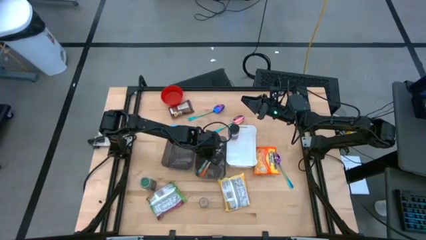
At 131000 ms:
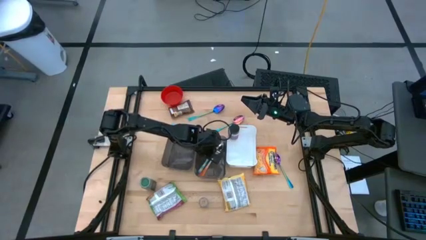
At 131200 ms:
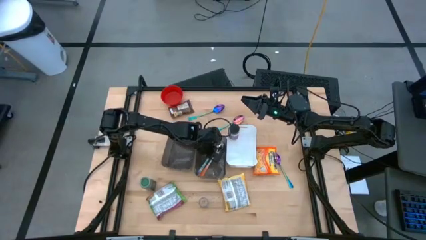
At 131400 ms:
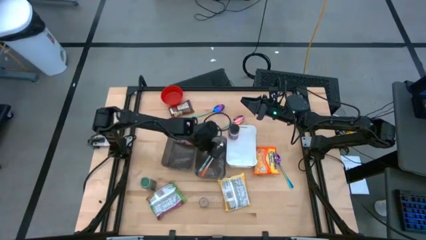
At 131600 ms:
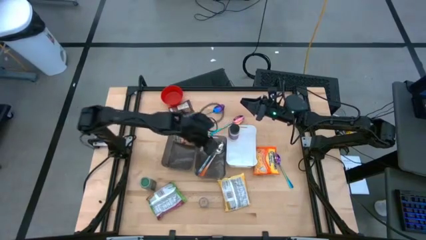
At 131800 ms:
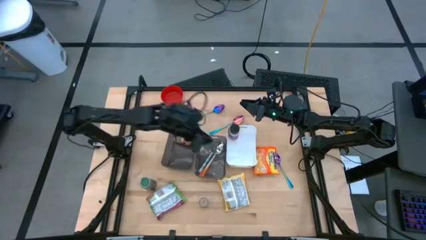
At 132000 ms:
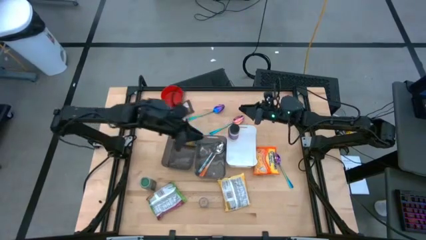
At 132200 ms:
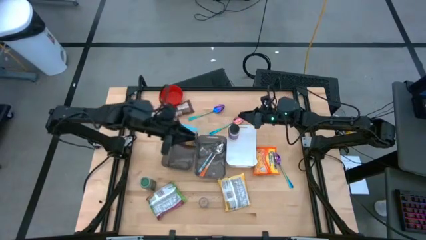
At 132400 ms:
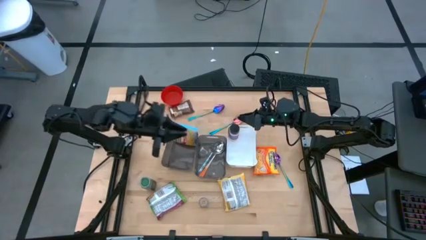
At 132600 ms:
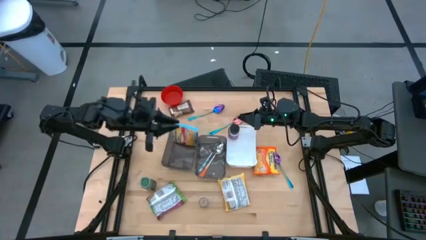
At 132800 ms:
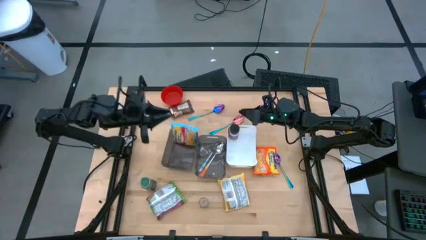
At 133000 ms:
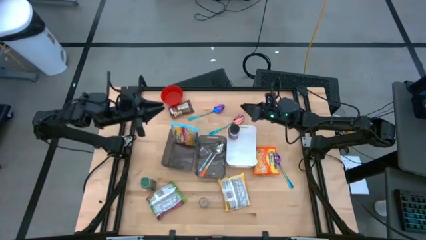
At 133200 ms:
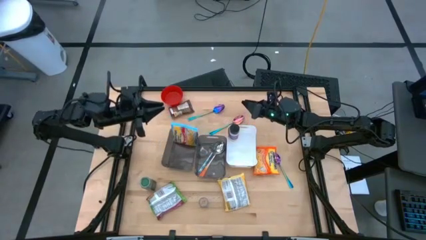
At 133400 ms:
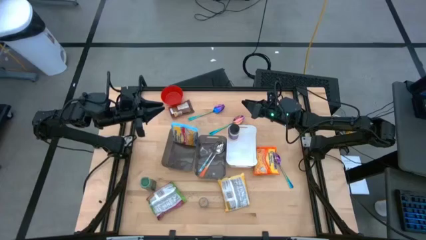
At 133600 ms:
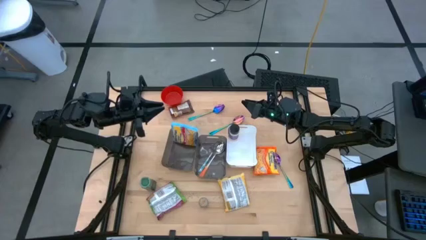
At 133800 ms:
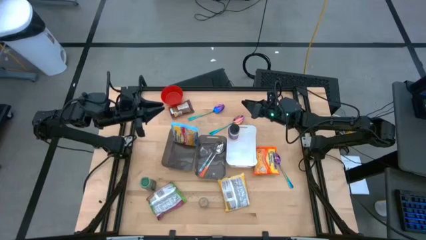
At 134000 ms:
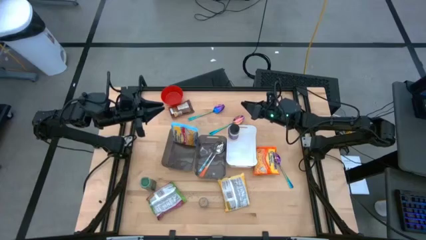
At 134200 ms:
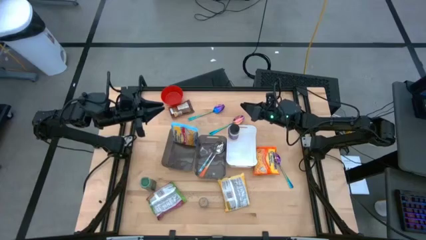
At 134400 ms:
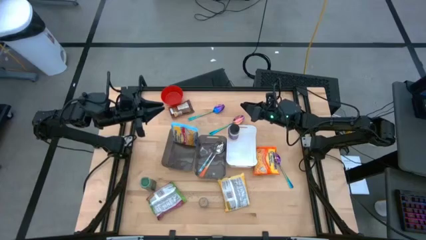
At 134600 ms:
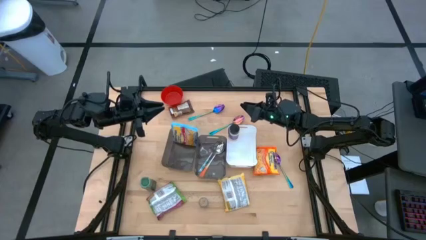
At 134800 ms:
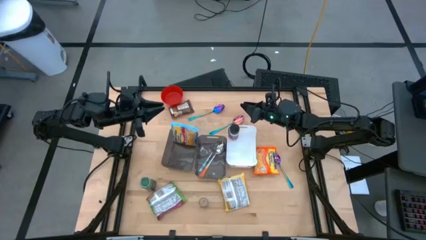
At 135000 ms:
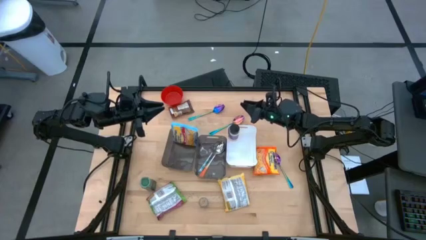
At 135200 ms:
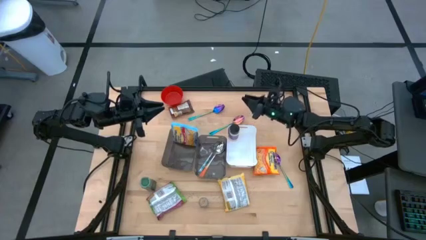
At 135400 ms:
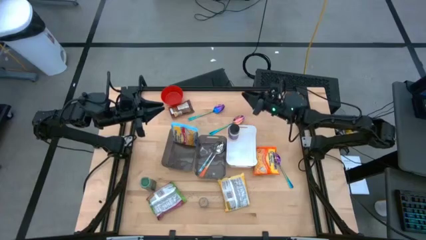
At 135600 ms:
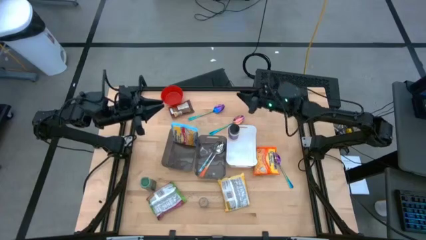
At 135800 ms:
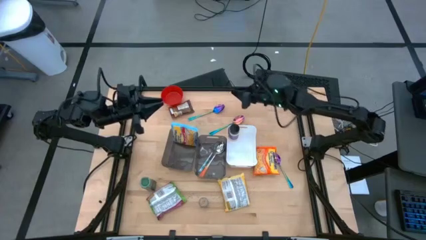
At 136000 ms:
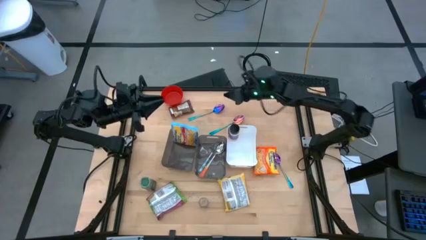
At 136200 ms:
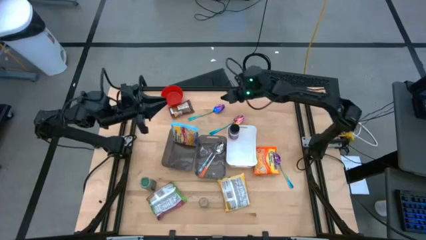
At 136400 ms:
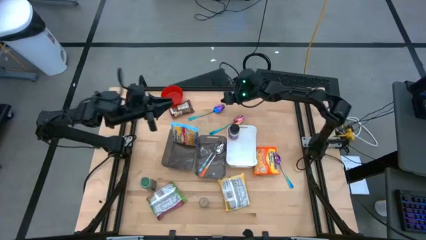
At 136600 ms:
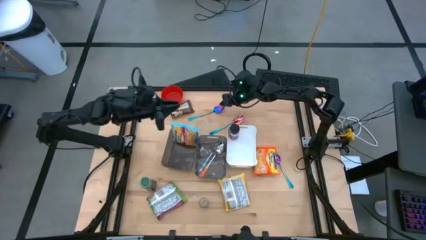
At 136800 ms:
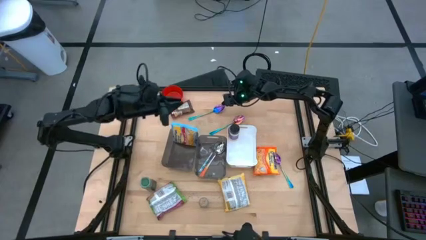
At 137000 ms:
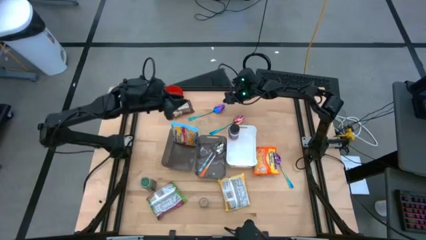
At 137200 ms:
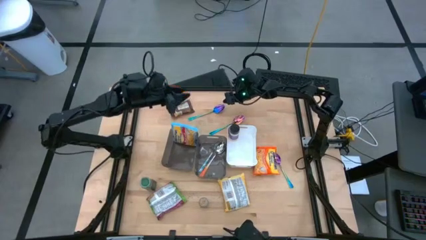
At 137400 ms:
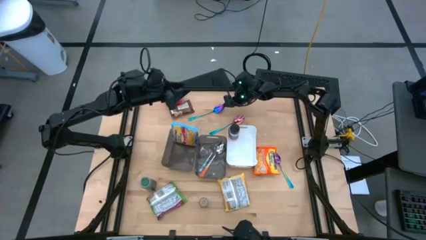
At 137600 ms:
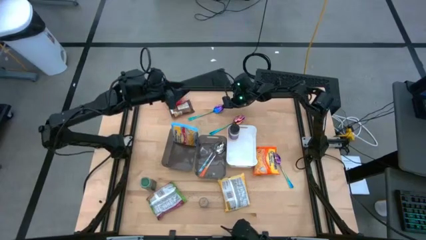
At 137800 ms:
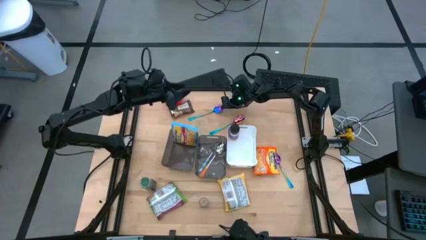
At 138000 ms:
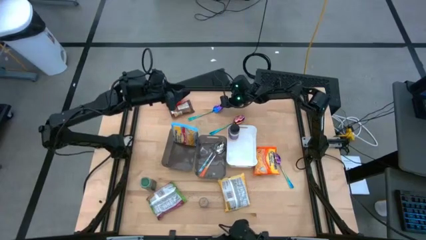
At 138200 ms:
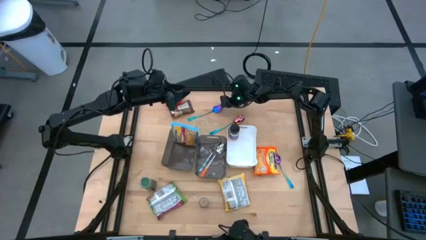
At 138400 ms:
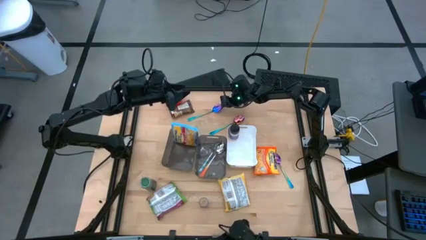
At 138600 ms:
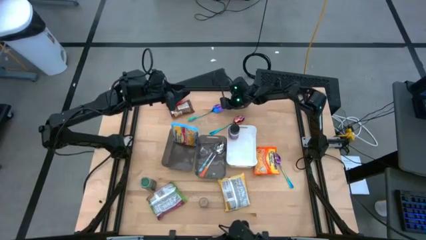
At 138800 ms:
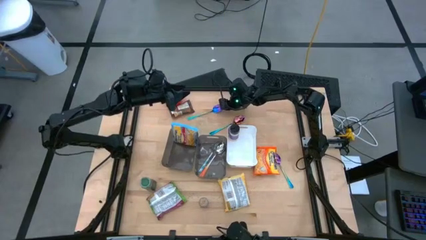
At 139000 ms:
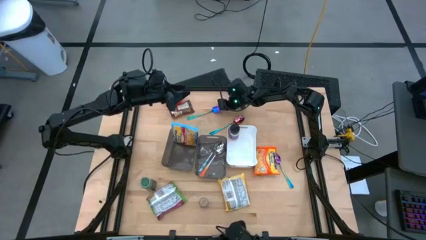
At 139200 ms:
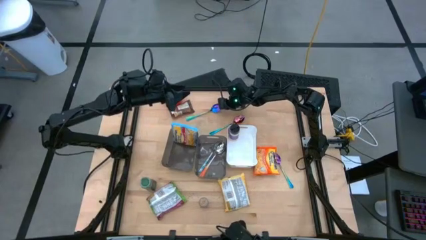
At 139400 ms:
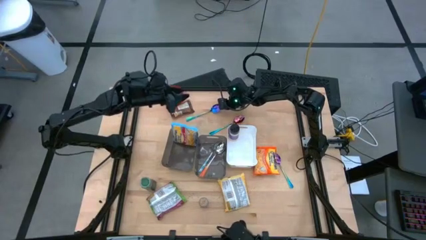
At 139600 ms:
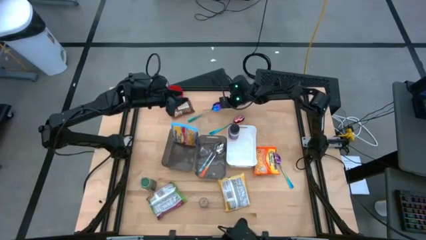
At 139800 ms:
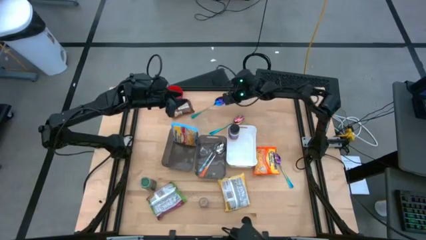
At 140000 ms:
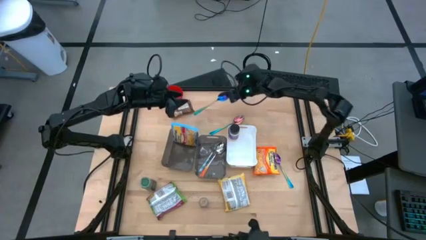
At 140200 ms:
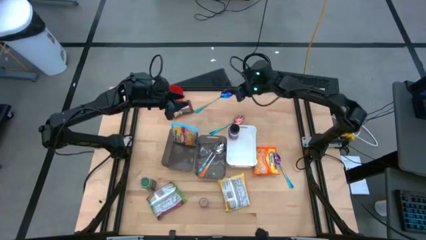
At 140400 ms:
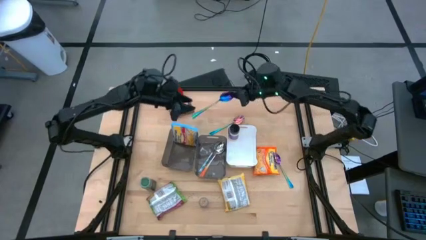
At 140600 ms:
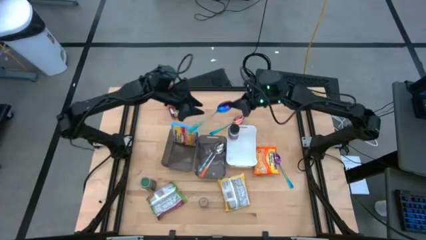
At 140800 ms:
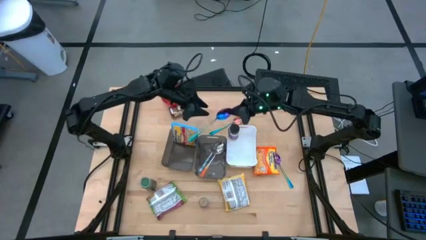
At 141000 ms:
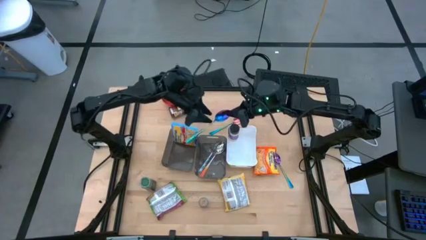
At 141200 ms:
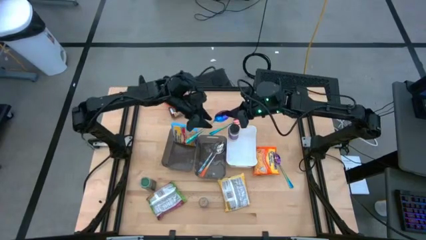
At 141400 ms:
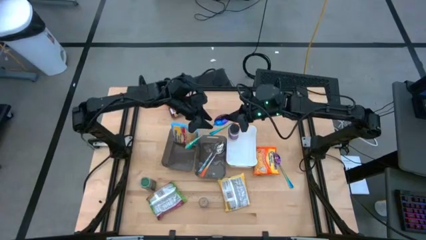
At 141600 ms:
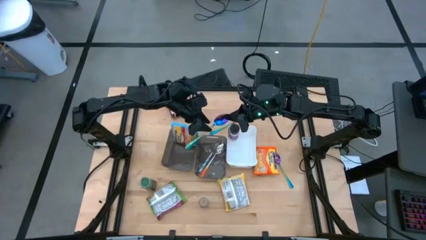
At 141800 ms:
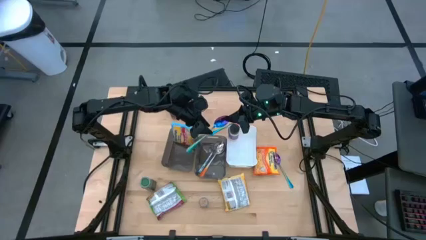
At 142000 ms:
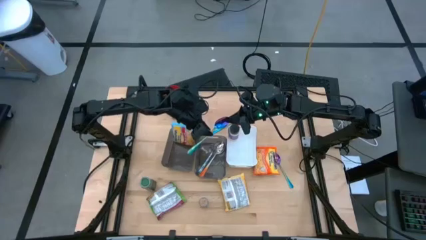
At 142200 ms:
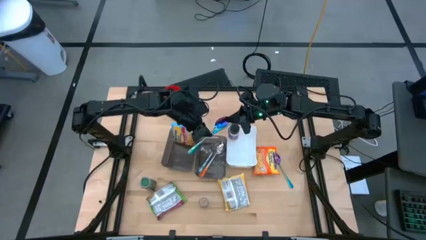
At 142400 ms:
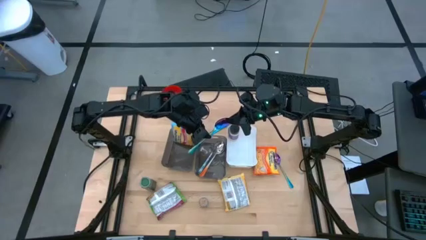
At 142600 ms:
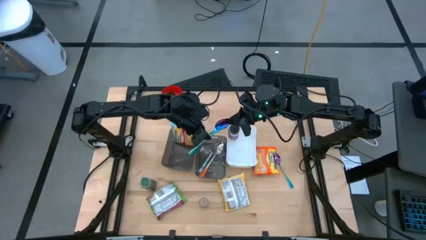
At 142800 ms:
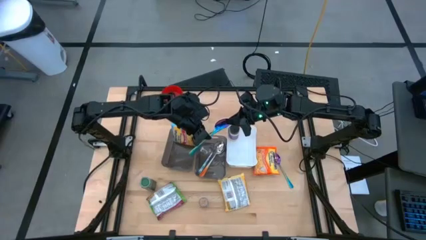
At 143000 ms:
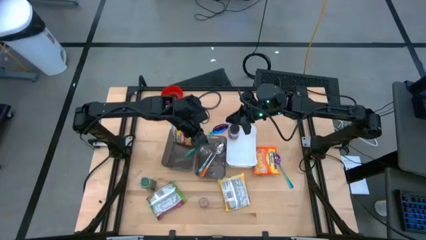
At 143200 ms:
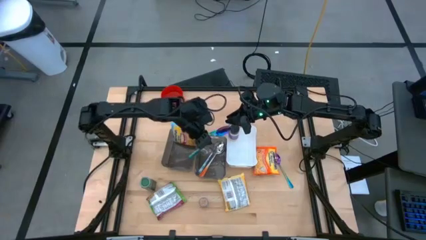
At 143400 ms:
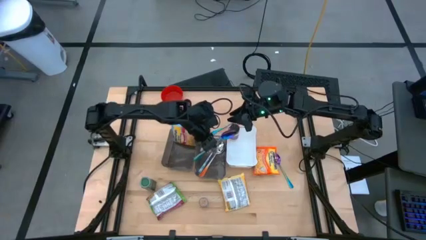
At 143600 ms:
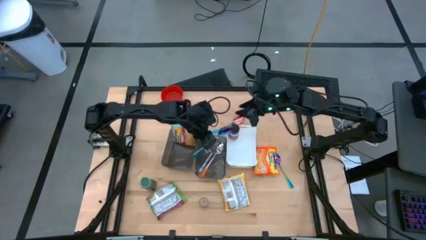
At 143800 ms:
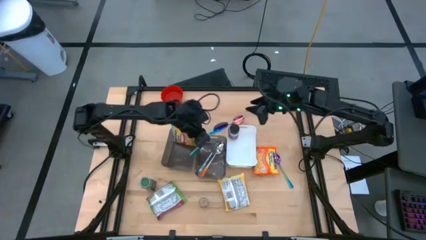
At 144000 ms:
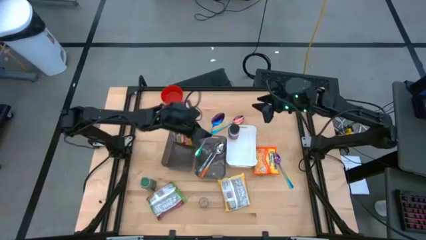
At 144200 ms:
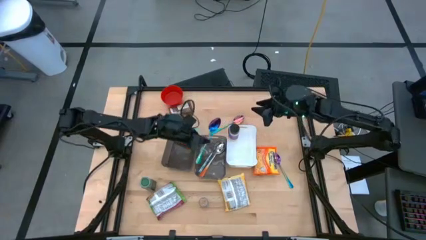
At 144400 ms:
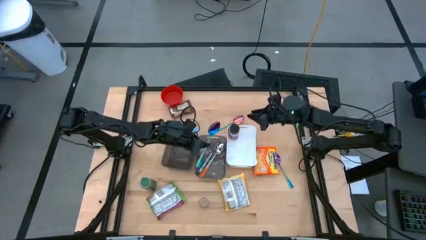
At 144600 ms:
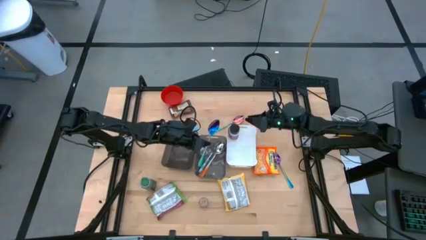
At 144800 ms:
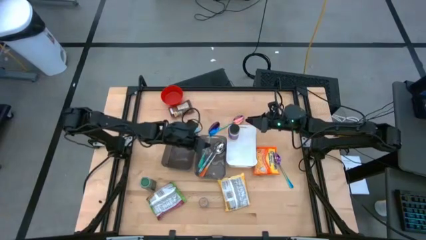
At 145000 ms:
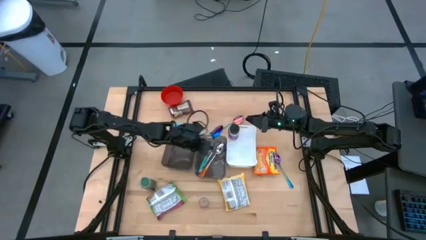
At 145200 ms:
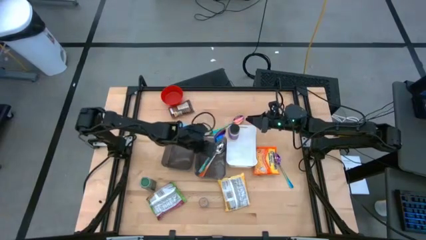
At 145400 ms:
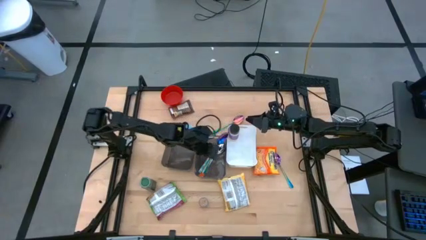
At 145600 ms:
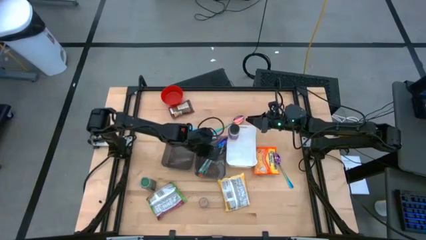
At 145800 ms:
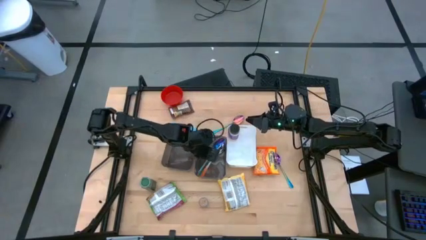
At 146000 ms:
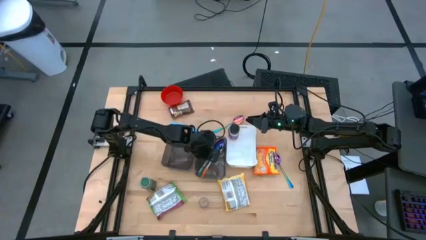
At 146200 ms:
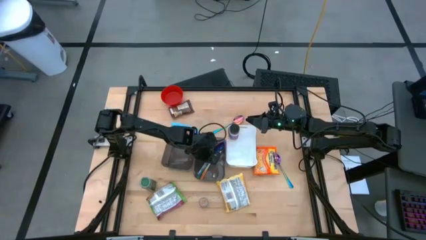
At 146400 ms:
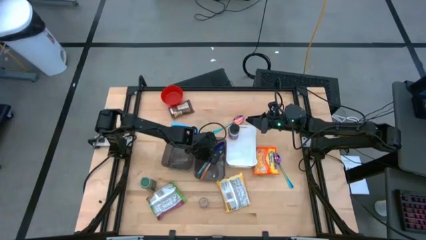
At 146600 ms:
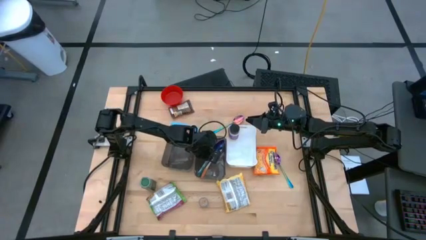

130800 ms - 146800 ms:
Task: Pick & Place Food Item
Put the blue spoon into the right gray bin

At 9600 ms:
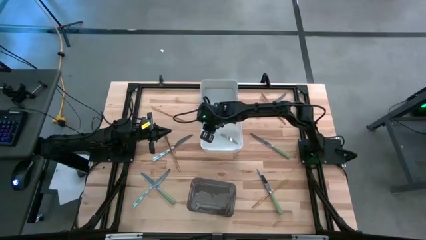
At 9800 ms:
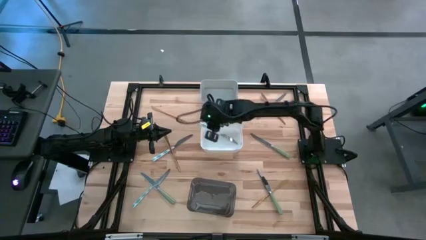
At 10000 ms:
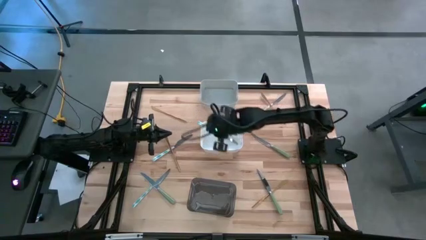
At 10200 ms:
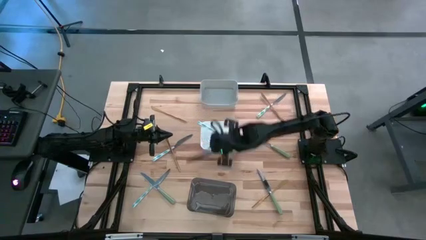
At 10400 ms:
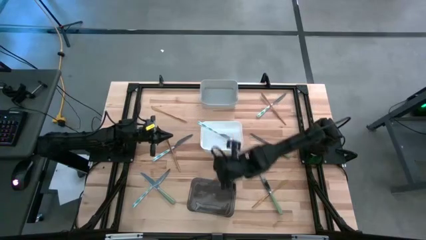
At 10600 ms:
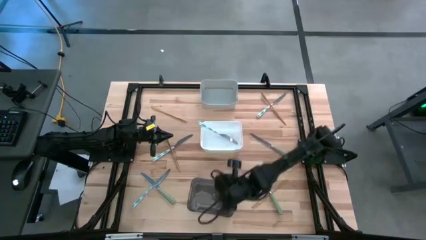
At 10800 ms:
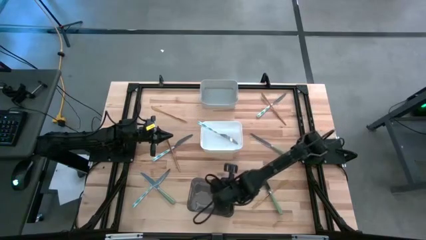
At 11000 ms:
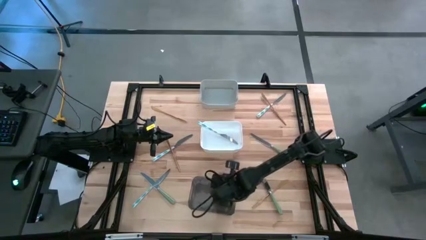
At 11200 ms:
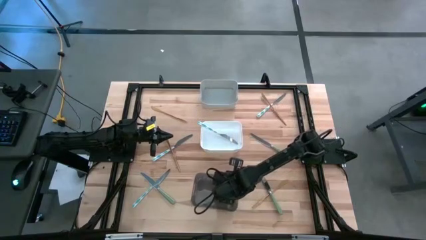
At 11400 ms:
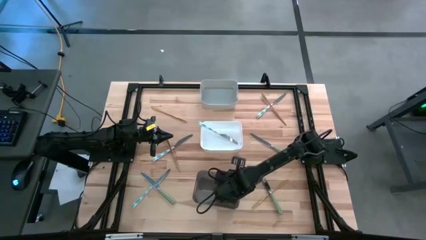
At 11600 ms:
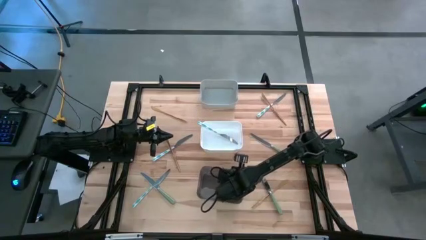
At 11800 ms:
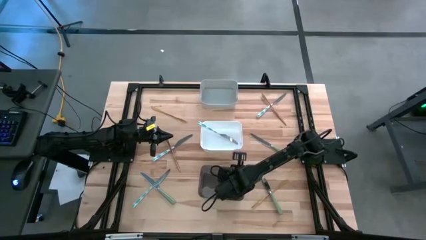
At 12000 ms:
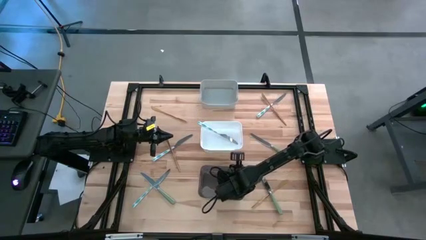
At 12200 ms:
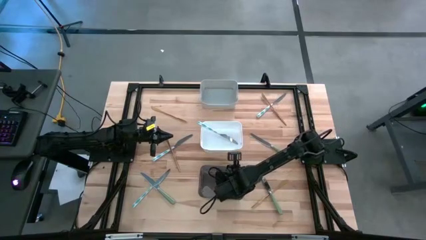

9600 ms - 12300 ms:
Task: Sort silverware by color (type)
Adjust the black bin
